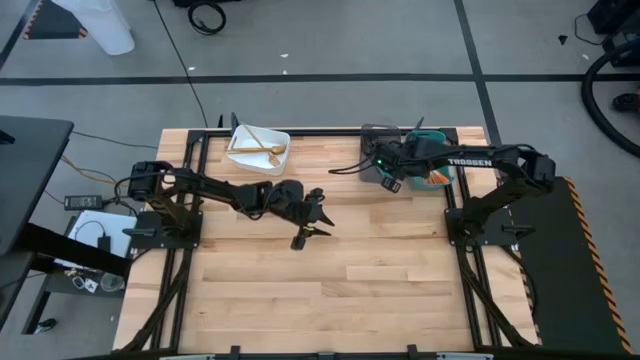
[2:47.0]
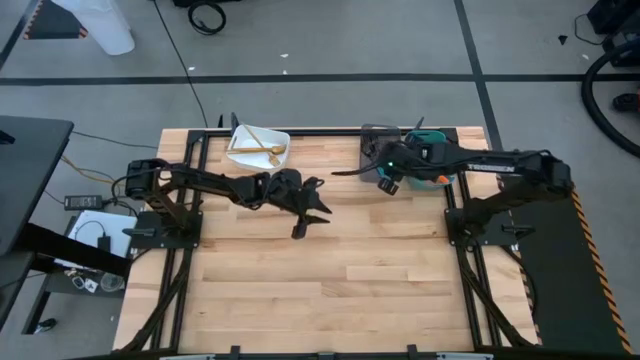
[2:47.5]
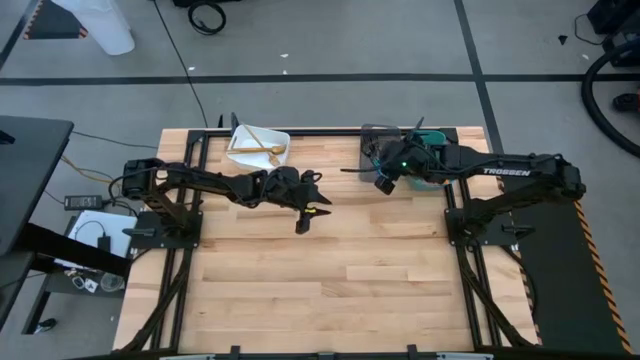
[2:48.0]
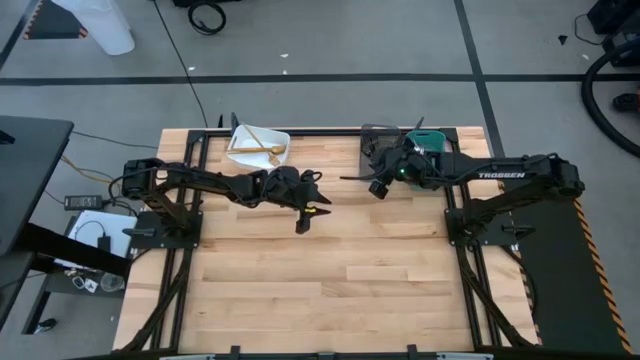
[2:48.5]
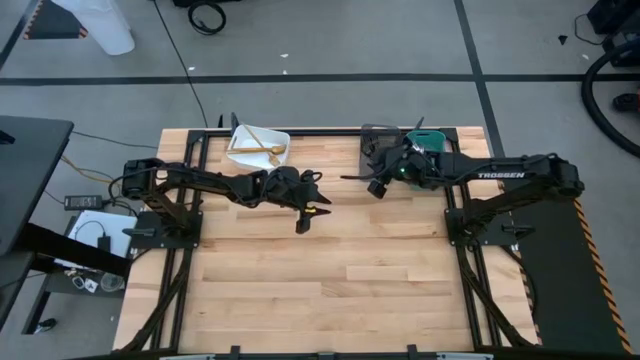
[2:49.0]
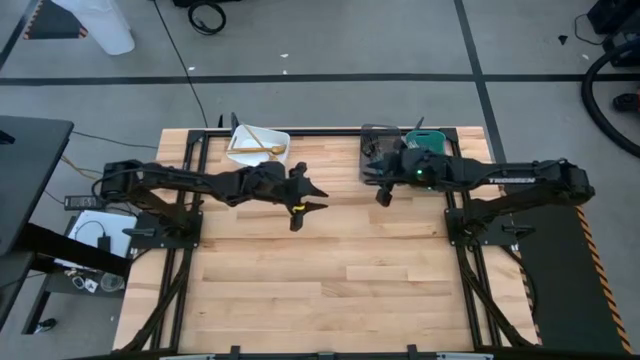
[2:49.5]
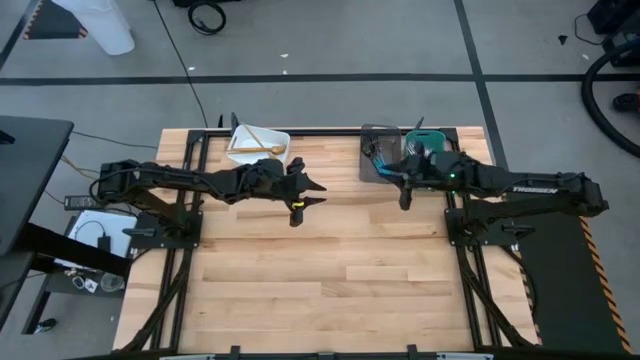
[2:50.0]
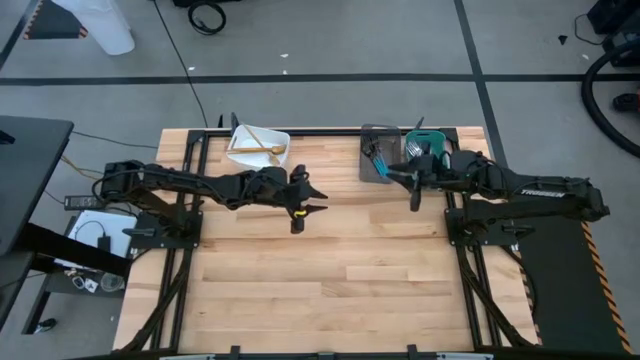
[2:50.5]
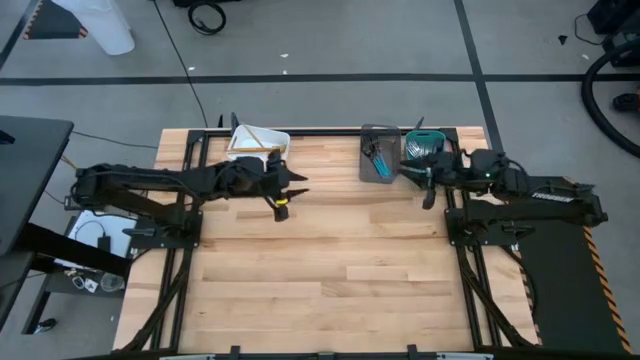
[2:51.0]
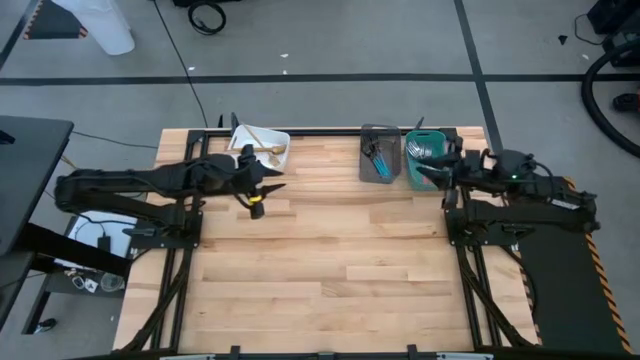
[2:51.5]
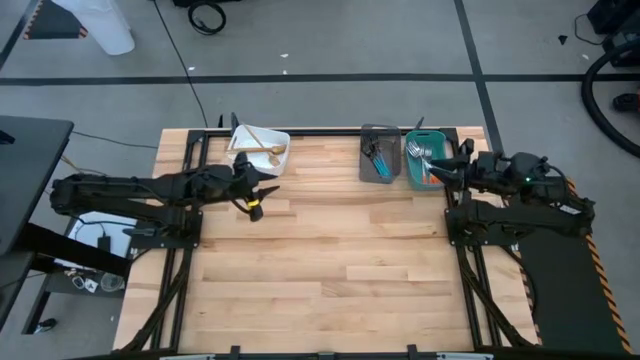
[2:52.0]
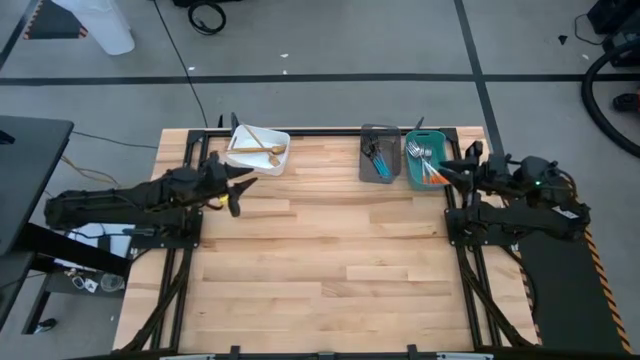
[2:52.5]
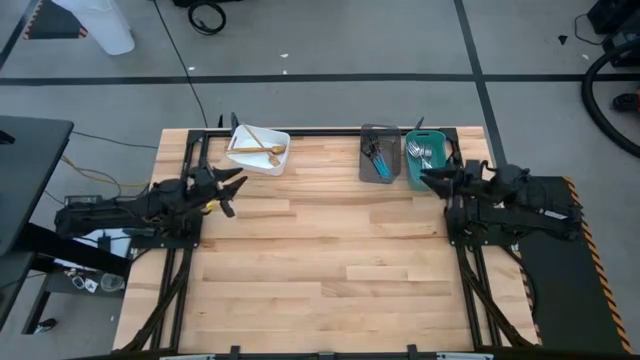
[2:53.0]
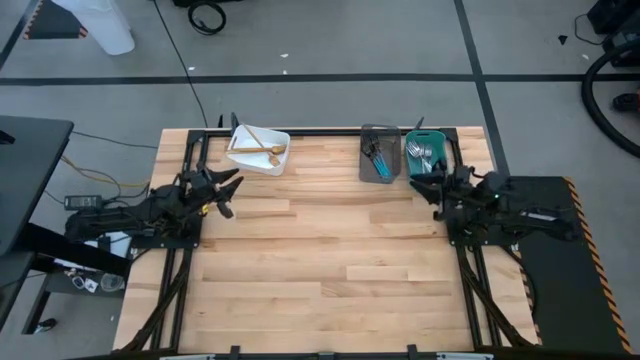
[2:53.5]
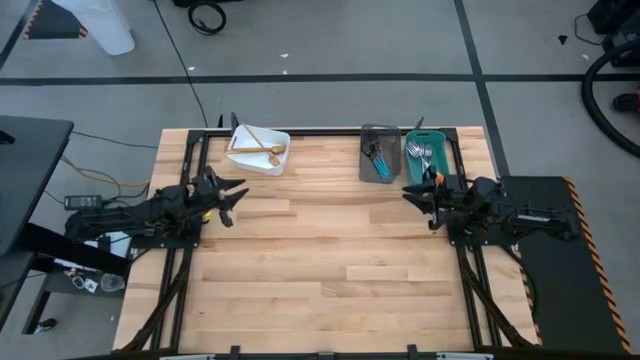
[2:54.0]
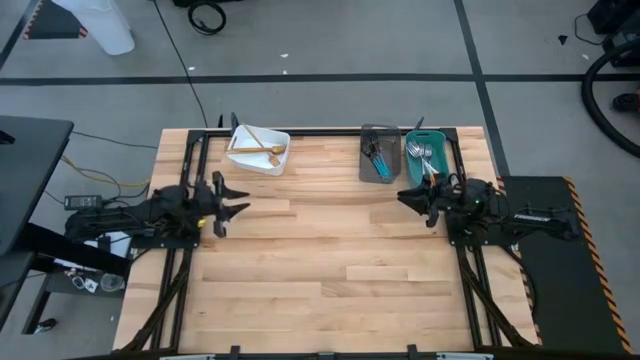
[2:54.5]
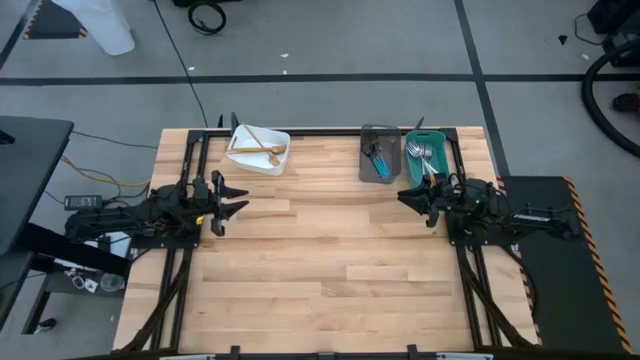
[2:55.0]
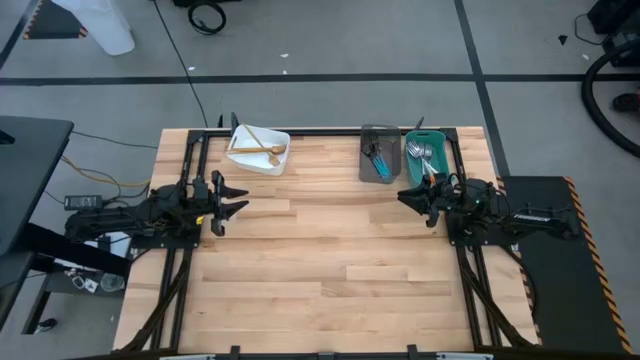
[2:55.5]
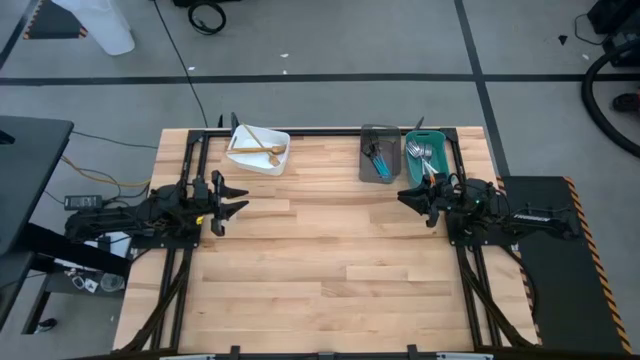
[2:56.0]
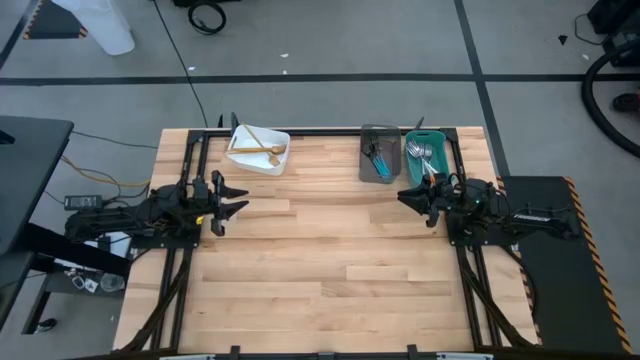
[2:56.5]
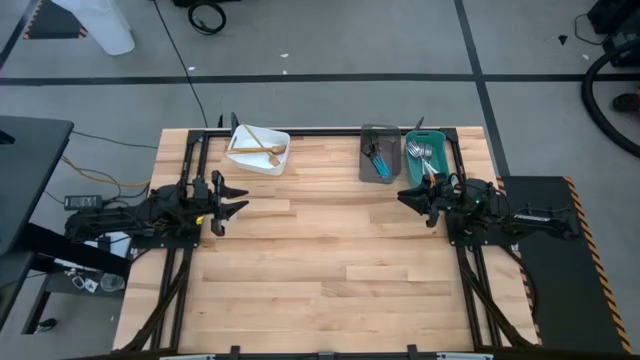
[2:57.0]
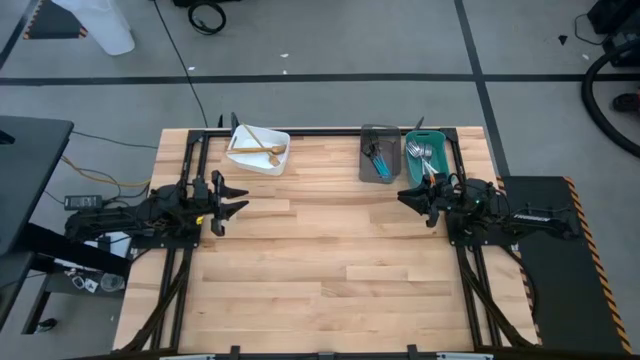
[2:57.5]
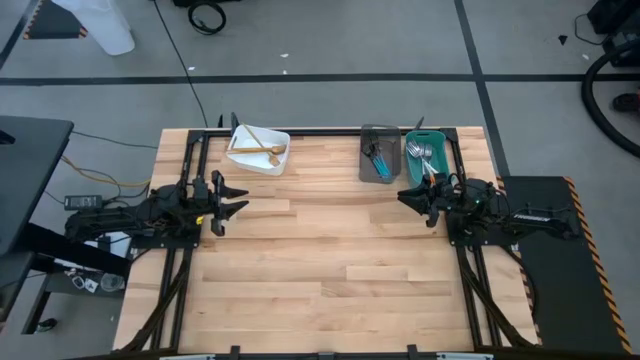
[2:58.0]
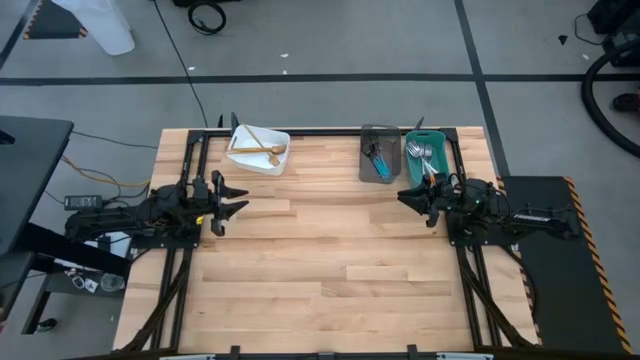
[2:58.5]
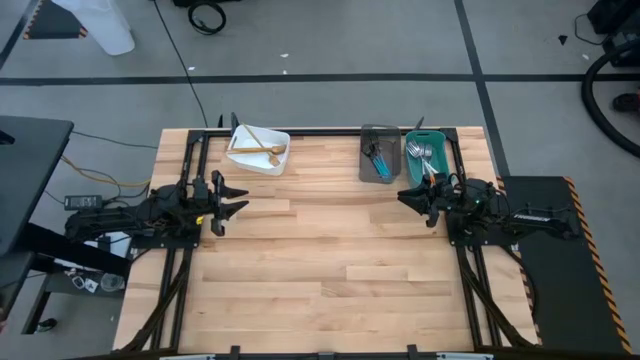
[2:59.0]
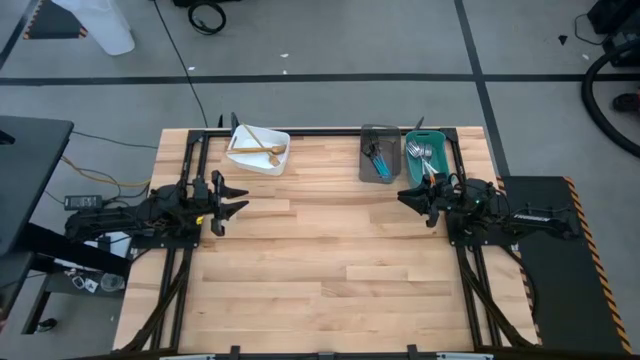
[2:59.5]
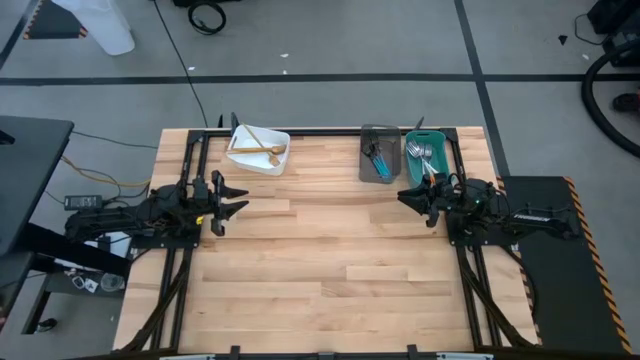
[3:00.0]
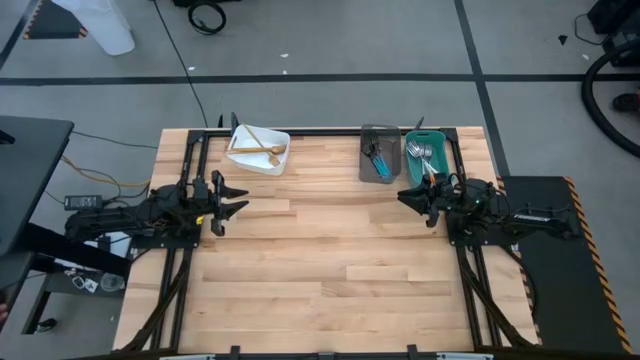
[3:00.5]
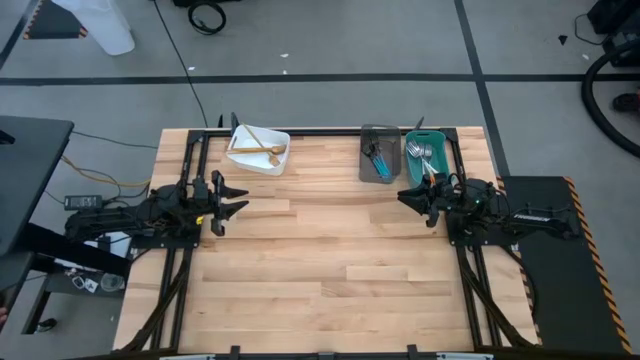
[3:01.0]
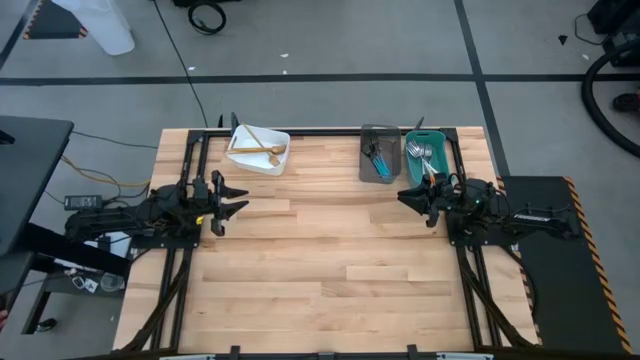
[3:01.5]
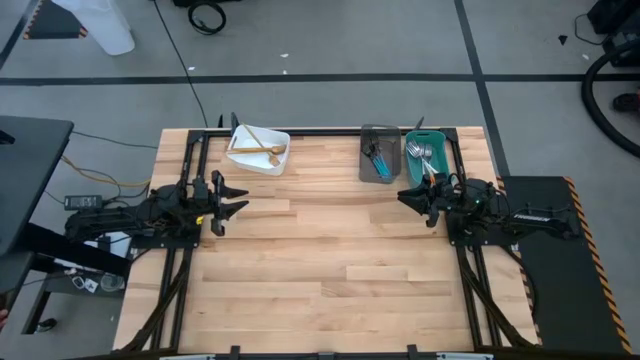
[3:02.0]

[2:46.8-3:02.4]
Task: Sort silverware by color (type)
Return to Home Position

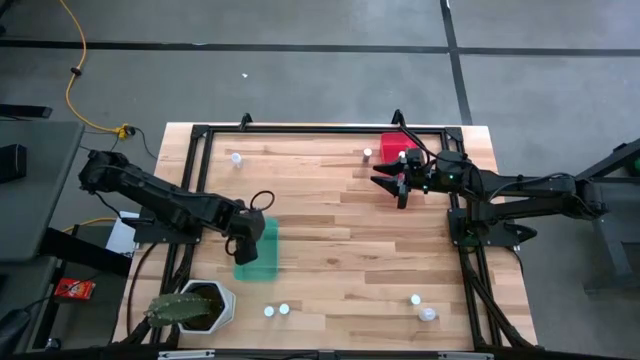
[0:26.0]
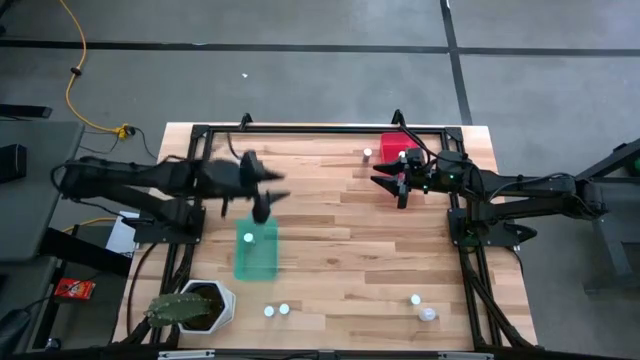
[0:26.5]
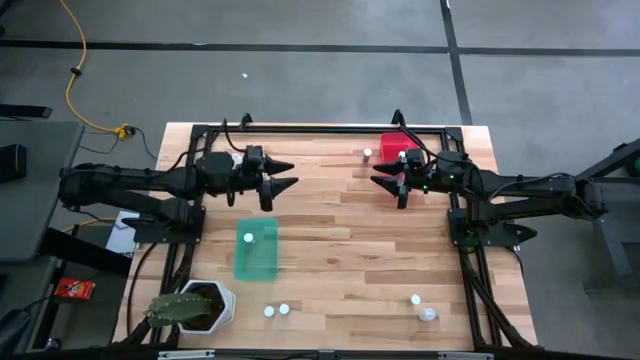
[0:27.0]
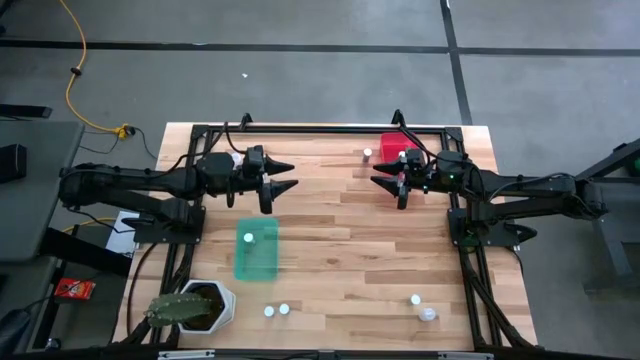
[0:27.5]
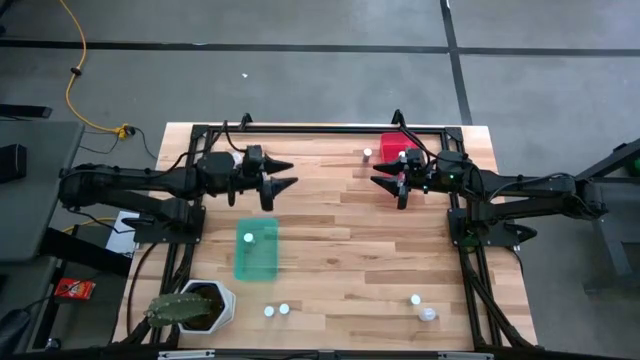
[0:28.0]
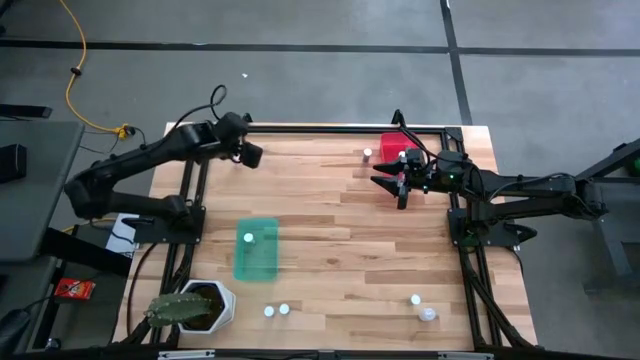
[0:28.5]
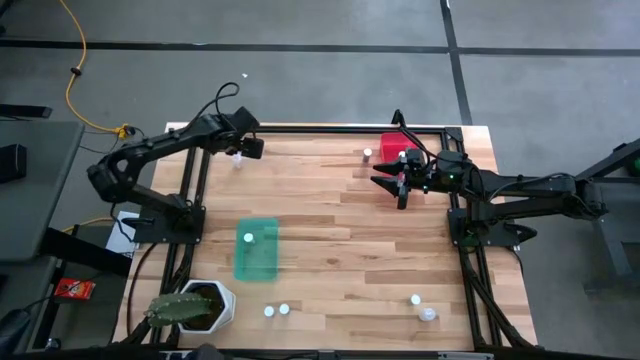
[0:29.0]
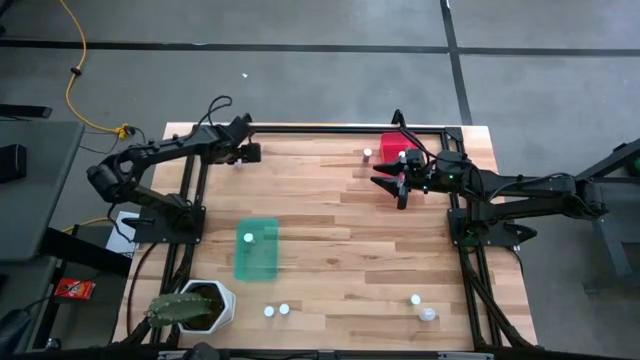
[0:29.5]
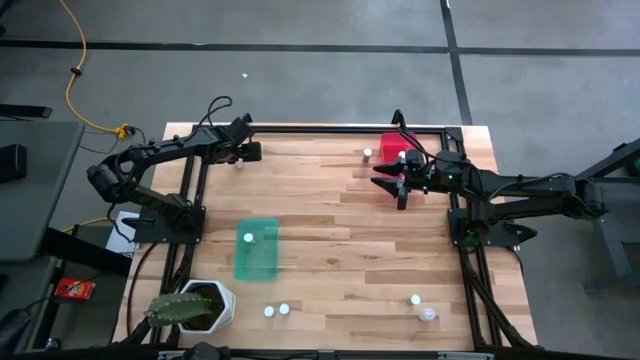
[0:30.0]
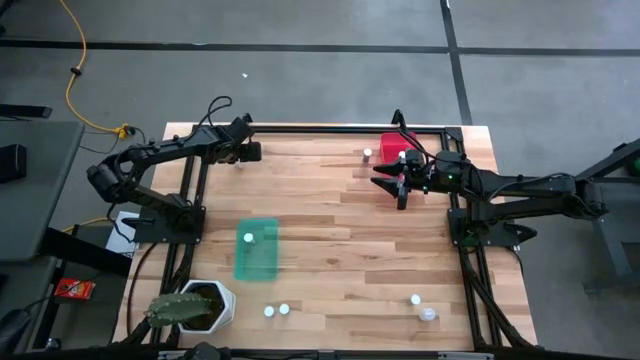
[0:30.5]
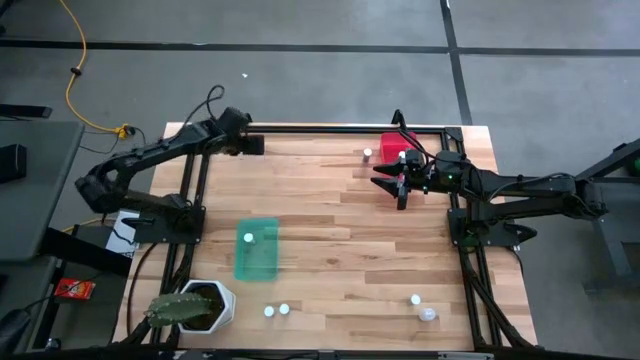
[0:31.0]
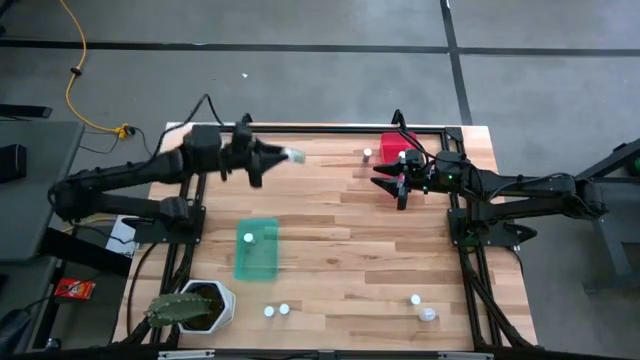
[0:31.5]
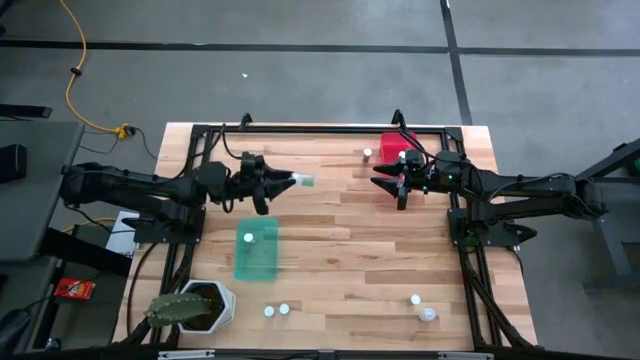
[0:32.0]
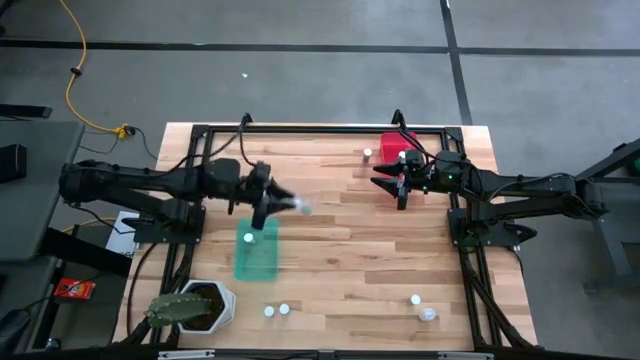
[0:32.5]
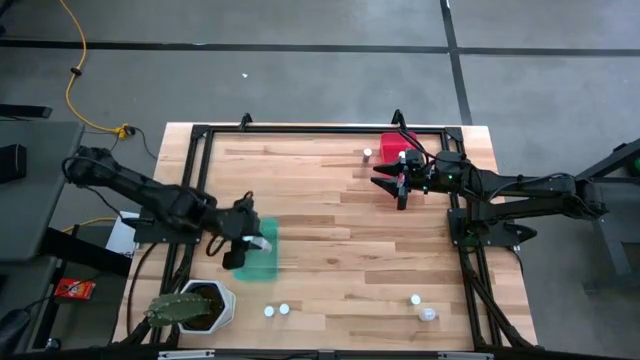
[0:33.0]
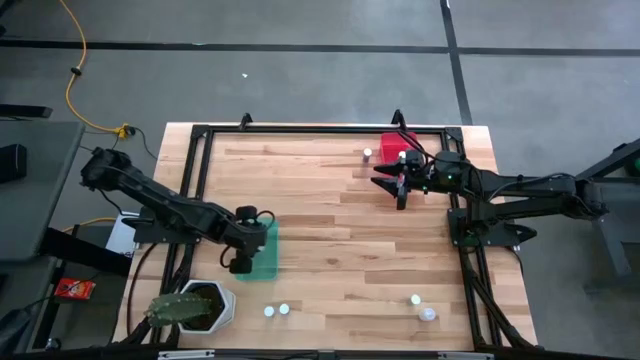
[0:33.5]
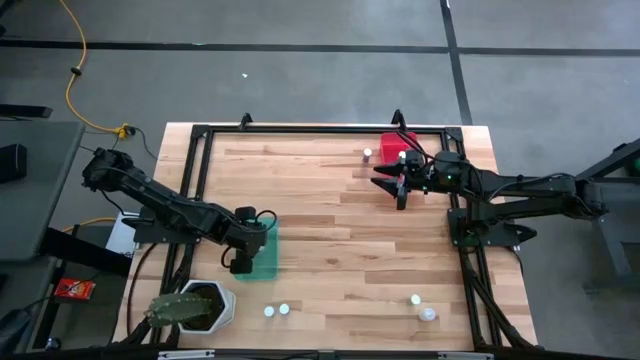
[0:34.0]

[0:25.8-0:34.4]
Task: Pick and place medicine bottles into bin by pill shape (circle, oval)
Put the transparent capsule bottle into the blue bin
